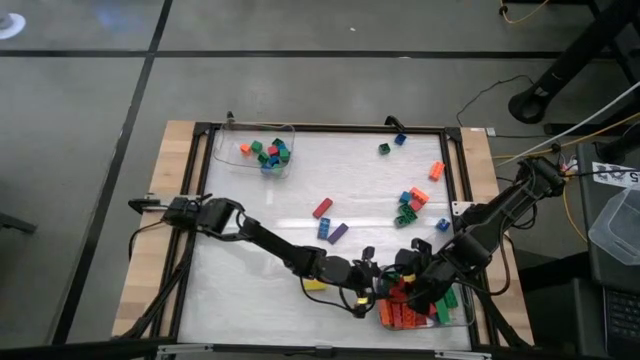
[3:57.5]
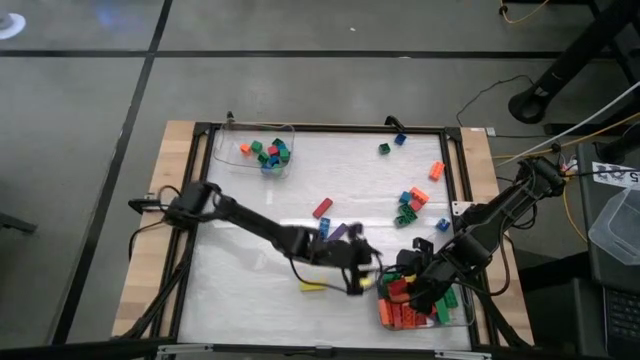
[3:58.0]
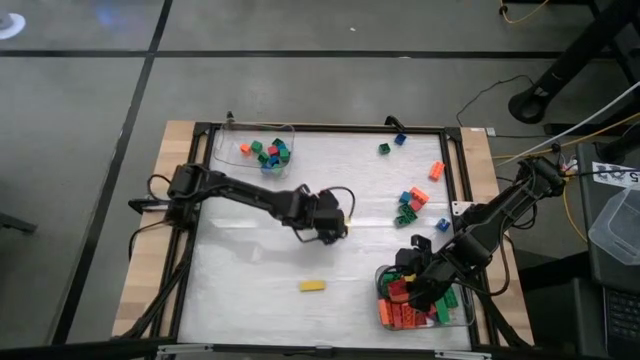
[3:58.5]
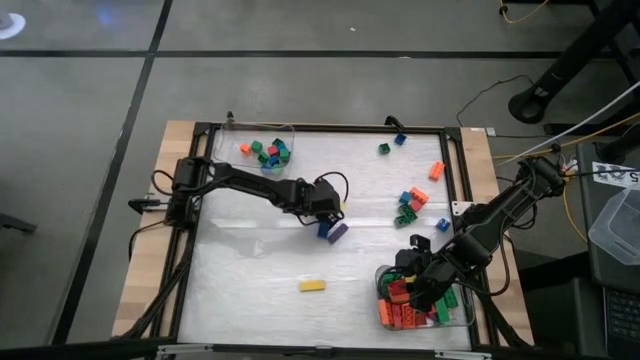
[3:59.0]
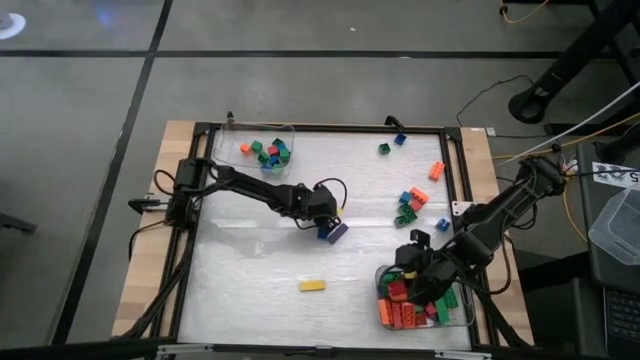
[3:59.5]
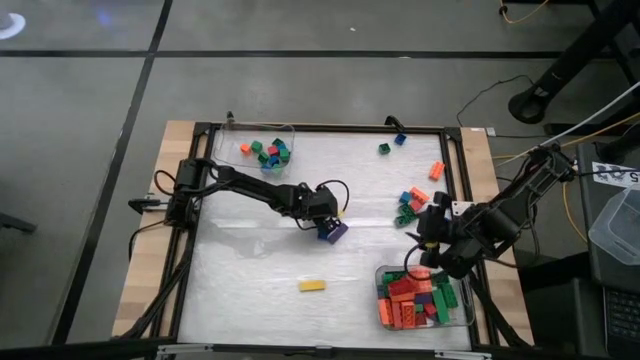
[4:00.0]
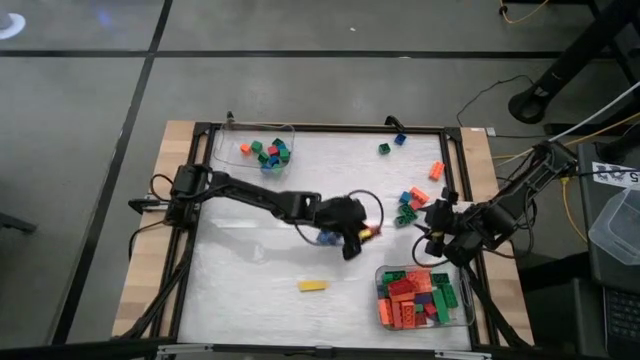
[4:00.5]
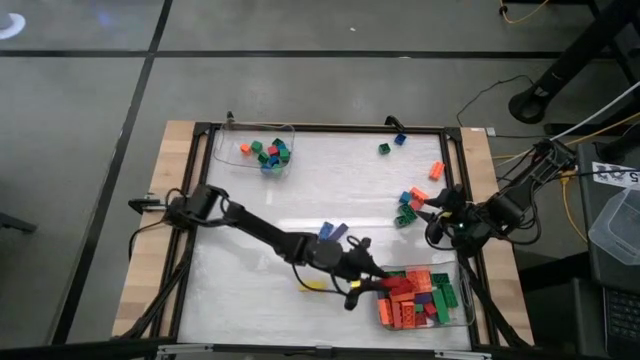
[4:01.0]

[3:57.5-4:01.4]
Task: Sort blocks by size
Put the rectangular red block into the bottom transparent bin

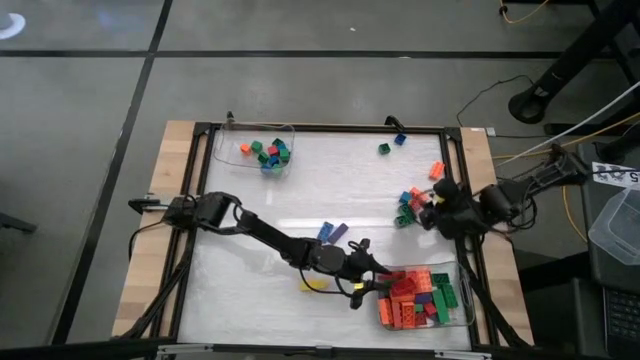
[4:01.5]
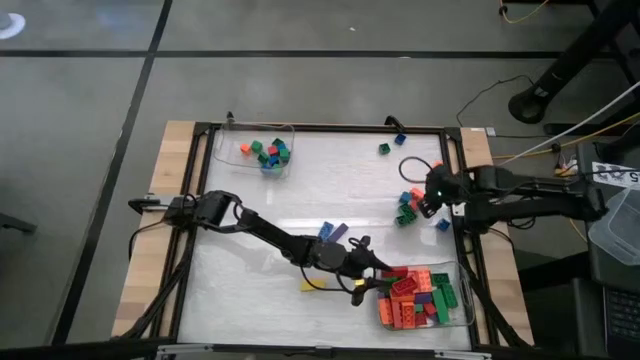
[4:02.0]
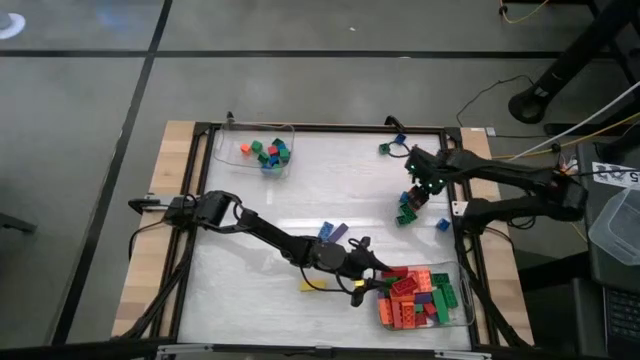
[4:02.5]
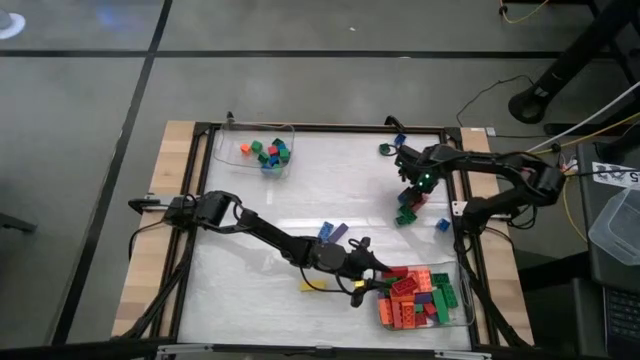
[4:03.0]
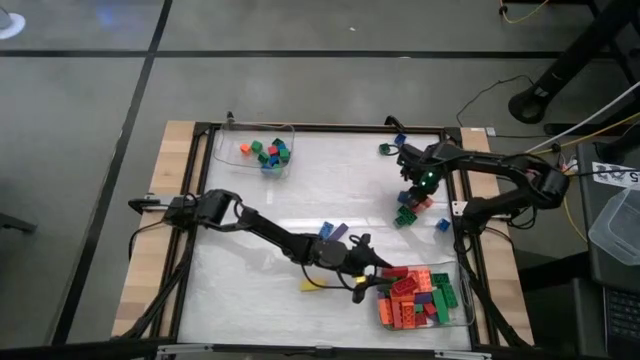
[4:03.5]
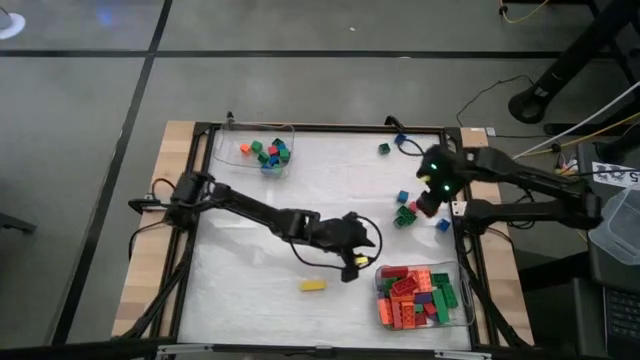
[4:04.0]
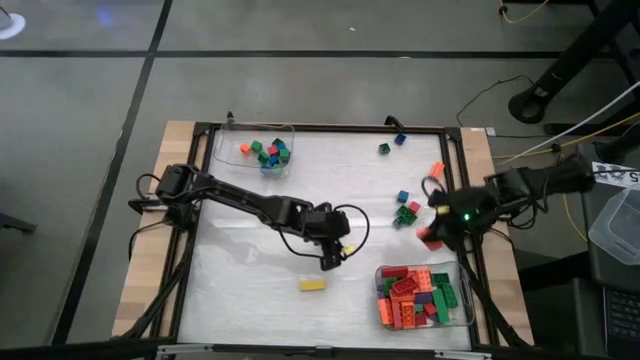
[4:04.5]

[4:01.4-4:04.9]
Put the rectangular orange game piece into the bottom transparent bin

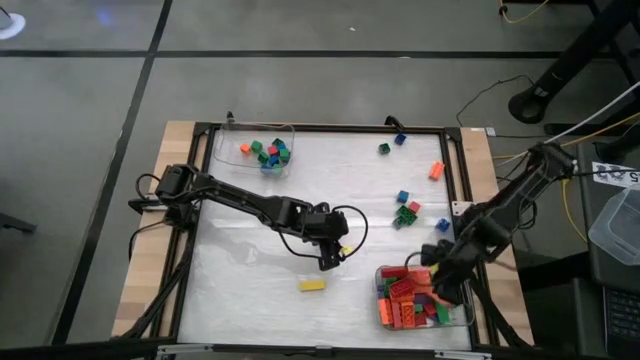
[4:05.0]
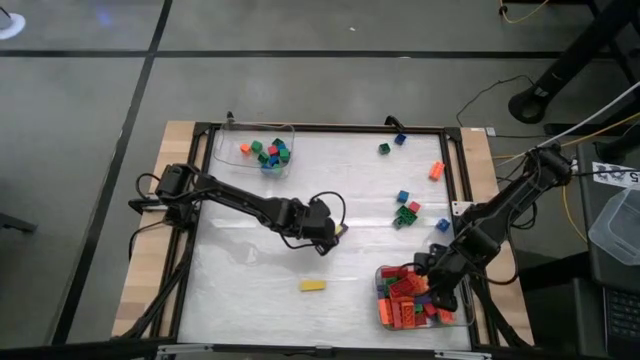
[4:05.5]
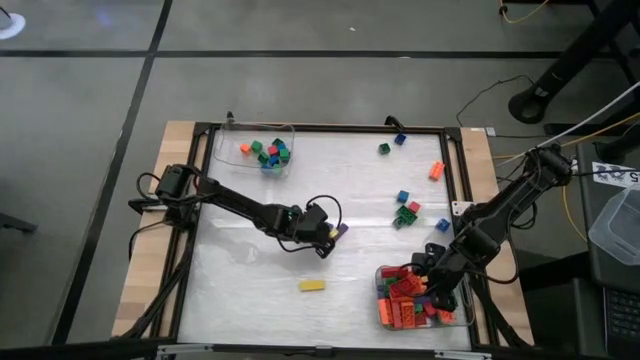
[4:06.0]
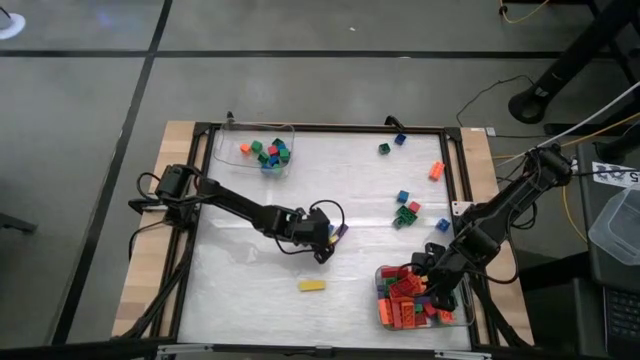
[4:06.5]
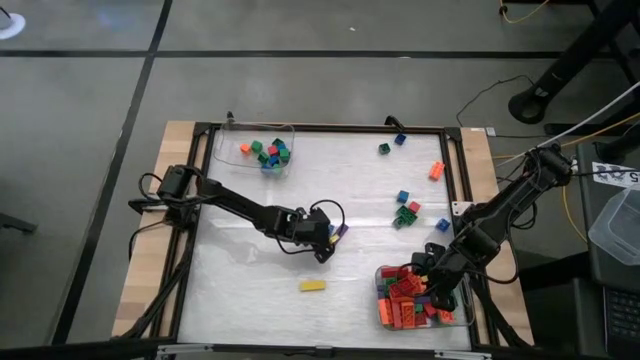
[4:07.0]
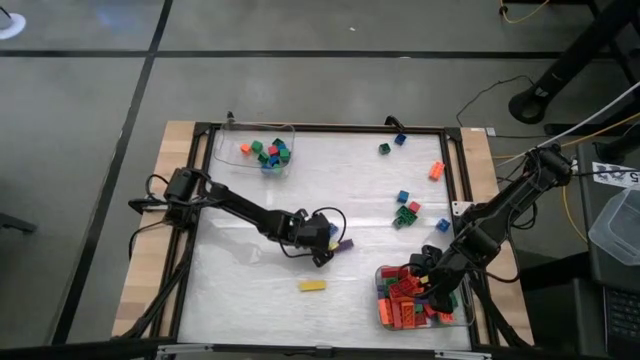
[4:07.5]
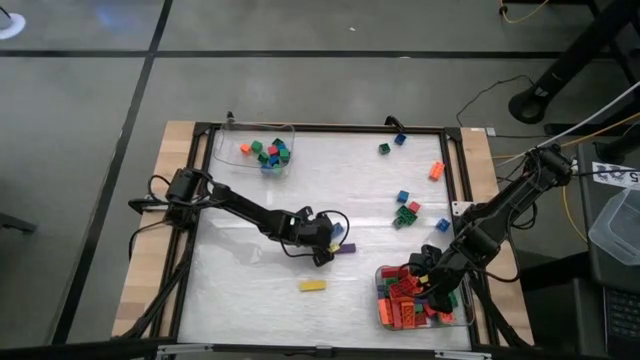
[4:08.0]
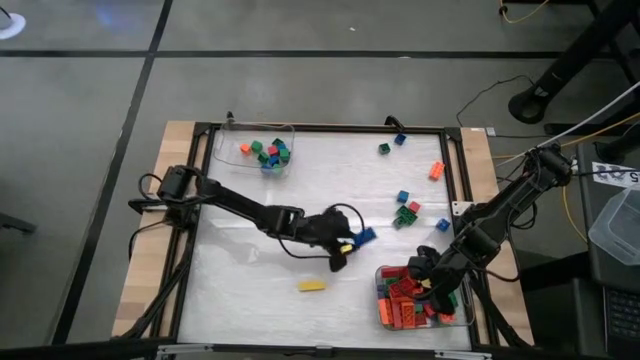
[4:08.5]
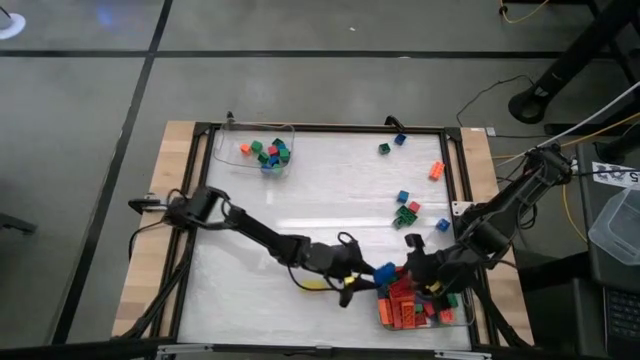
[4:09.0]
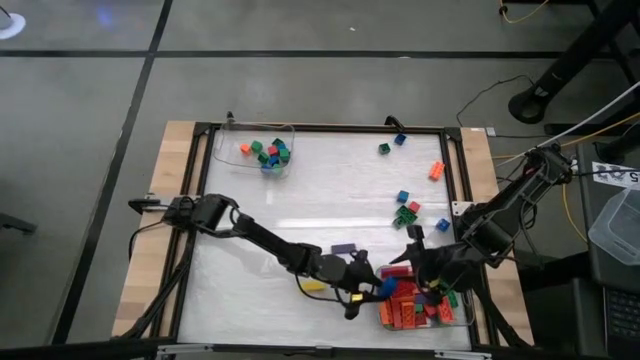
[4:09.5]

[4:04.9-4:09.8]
Put the rectangular blue game piece into the bottom transparent bin

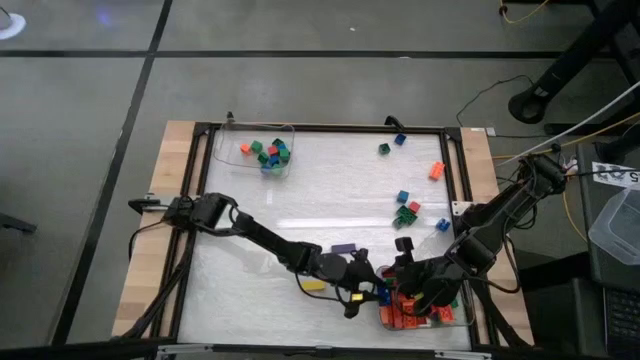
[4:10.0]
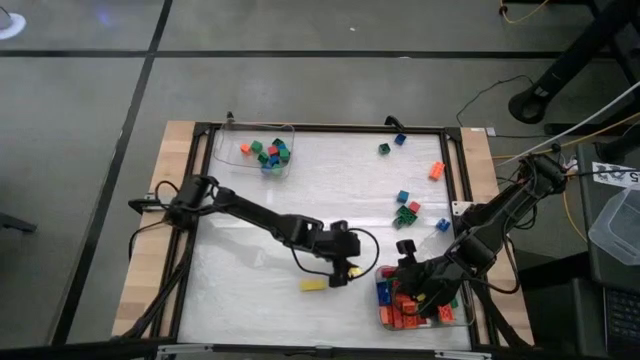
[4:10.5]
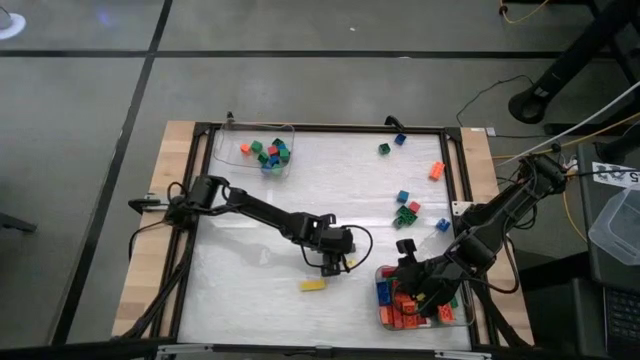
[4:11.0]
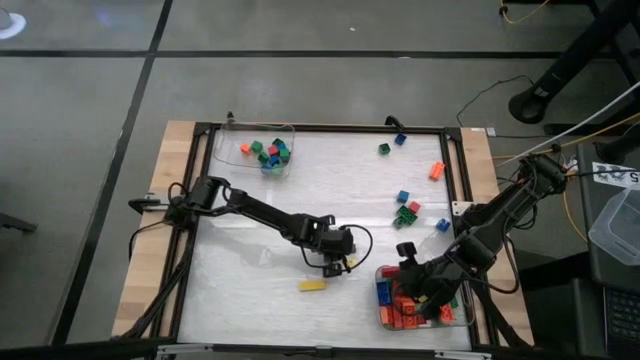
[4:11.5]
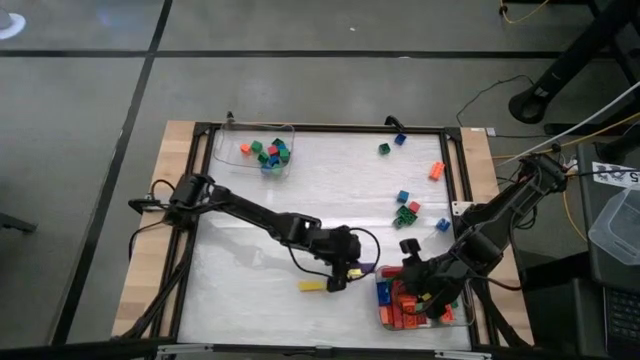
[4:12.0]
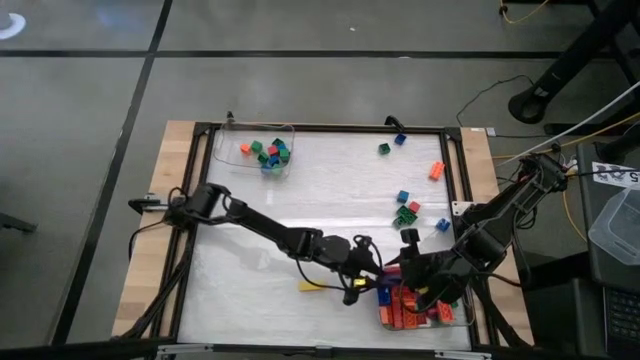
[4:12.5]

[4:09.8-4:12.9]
Put the rectangular violet block into the bottom transparent bin

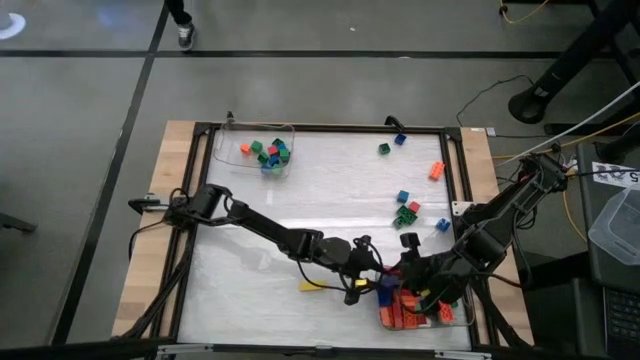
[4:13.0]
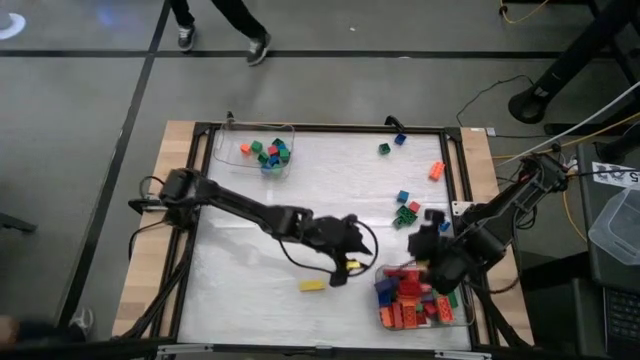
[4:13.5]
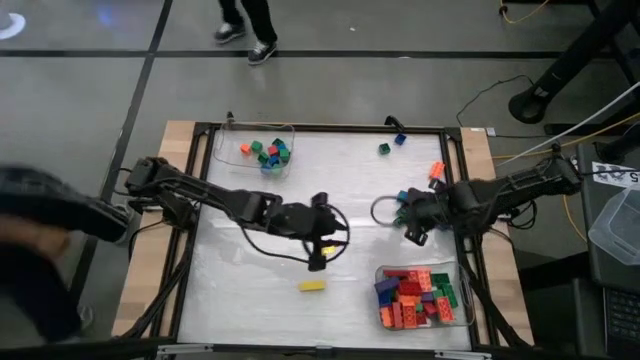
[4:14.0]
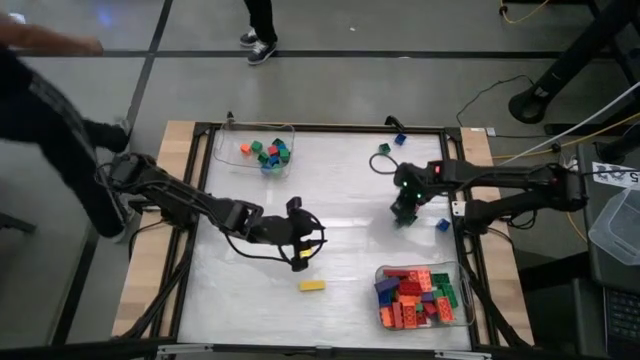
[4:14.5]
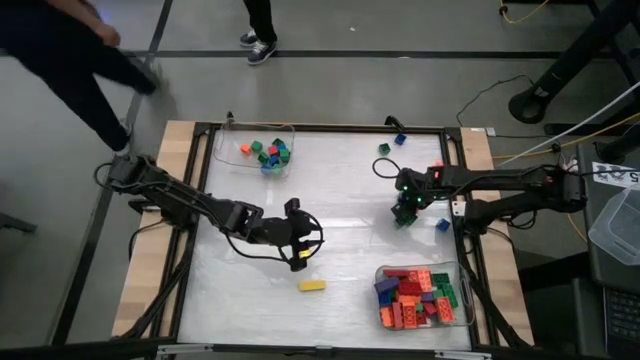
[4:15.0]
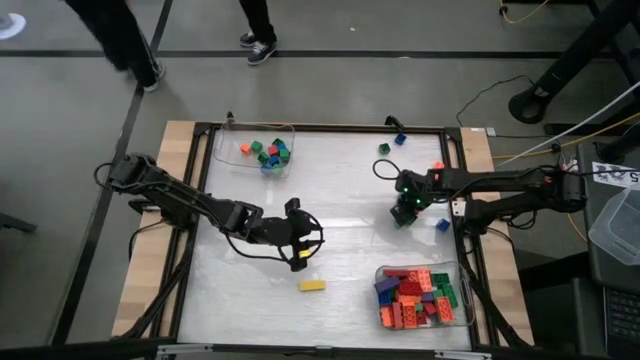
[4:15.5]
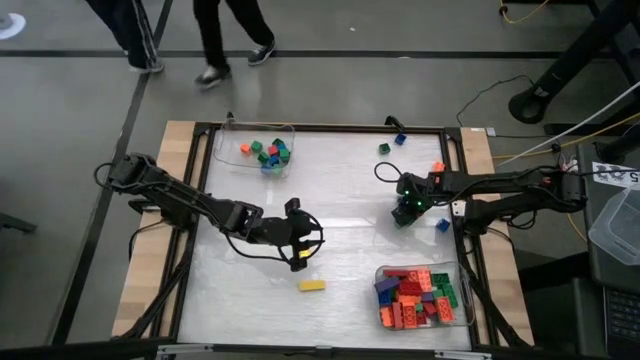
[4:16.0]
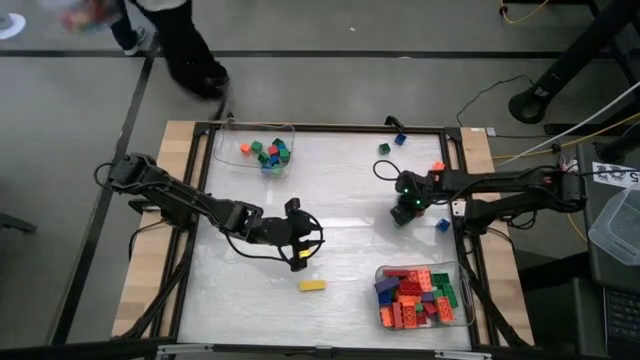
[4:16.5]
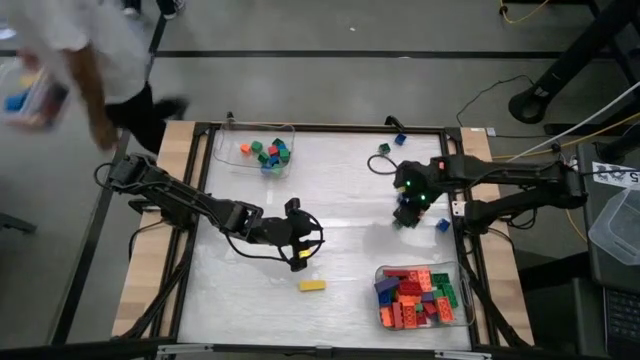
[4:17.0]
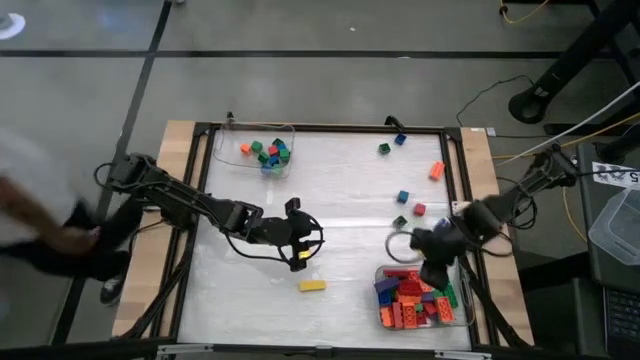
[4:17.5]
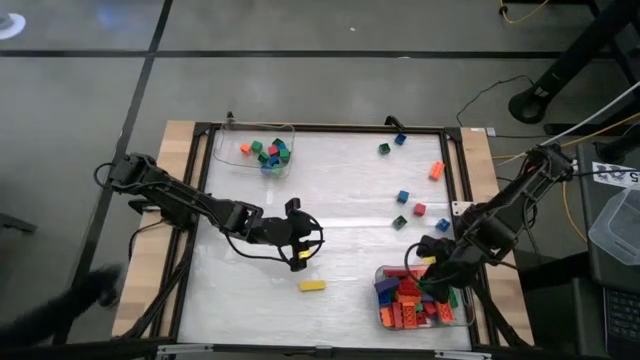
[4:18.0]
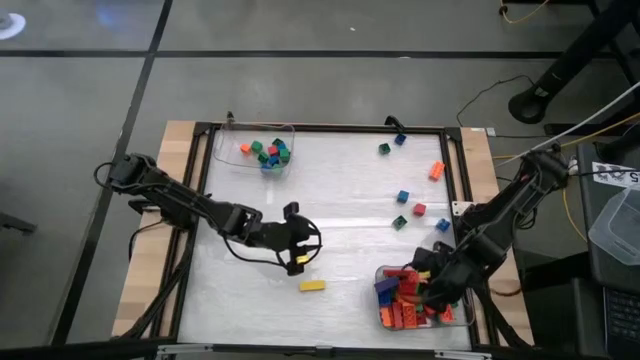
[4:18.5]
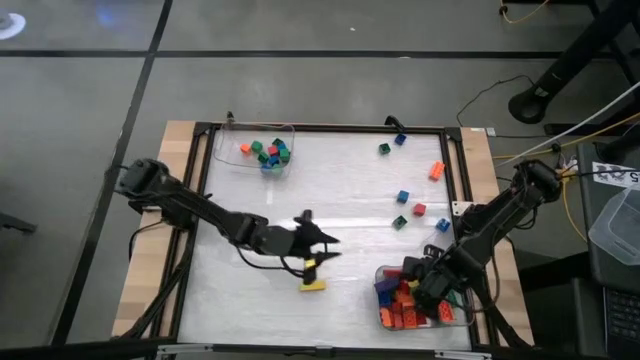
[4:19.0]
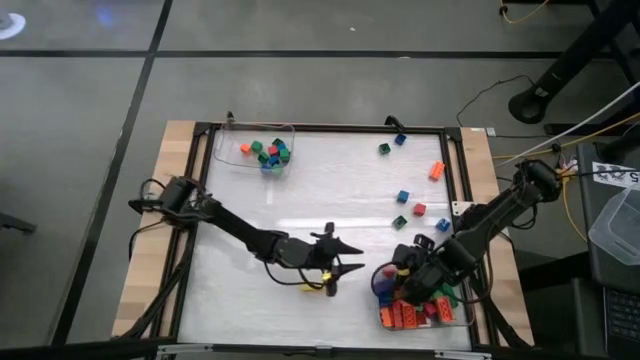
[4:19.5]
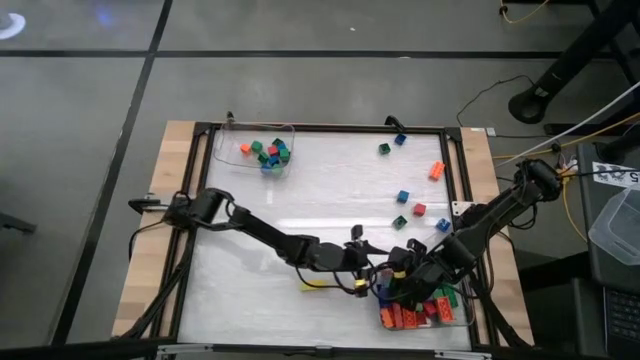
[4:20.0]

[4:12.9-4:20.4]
Put the rectangular green game piece into the bottom transparent bin
